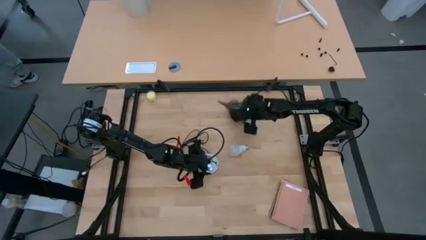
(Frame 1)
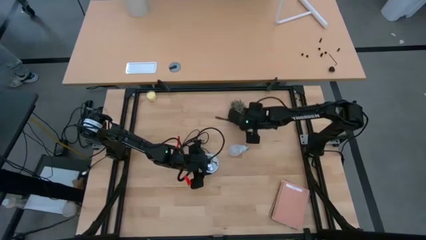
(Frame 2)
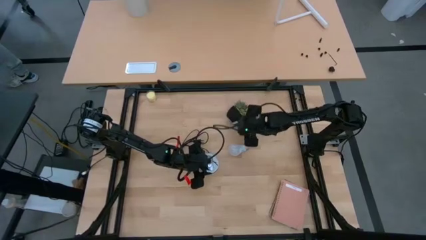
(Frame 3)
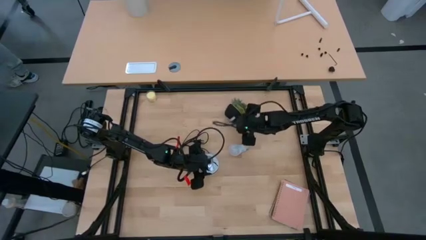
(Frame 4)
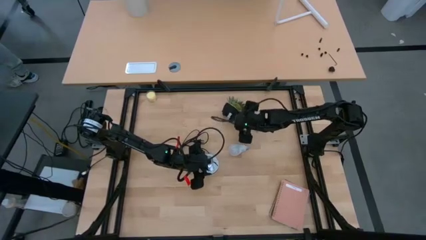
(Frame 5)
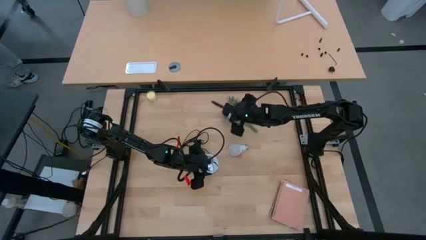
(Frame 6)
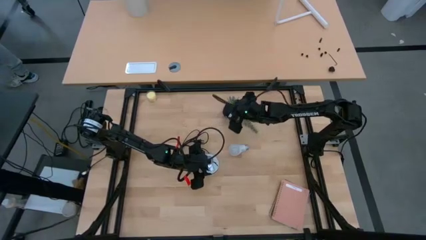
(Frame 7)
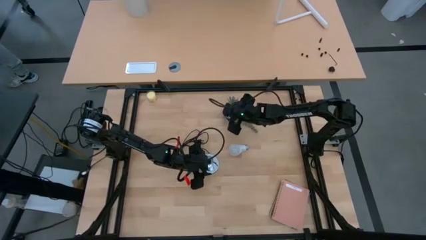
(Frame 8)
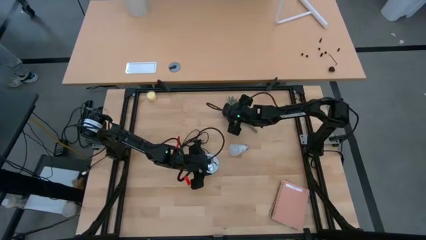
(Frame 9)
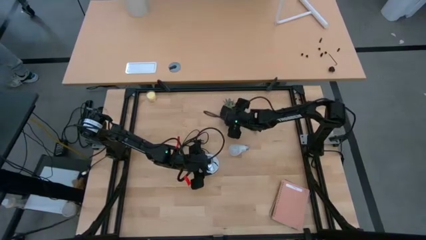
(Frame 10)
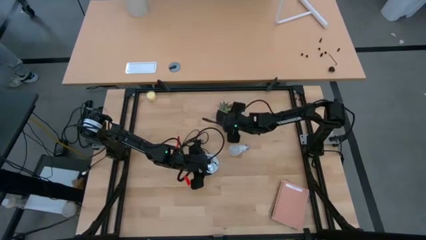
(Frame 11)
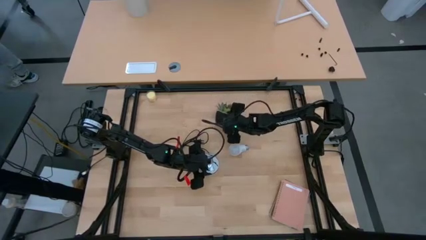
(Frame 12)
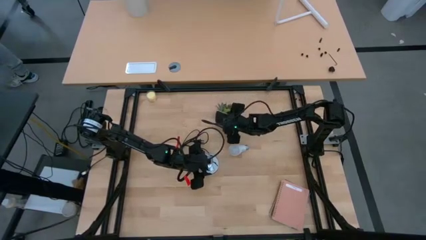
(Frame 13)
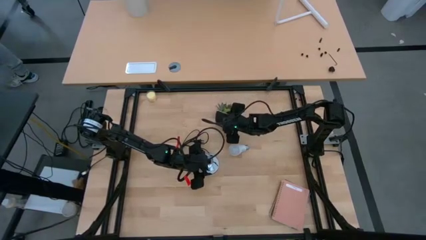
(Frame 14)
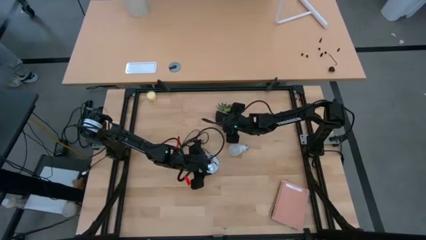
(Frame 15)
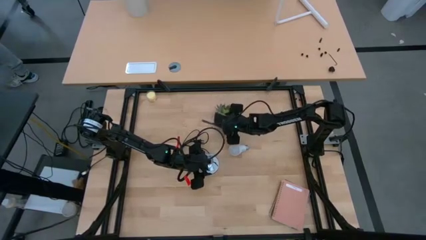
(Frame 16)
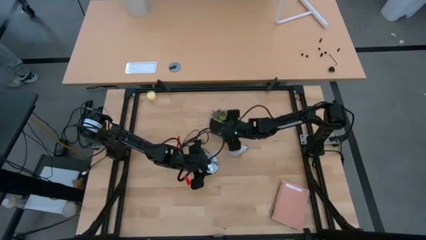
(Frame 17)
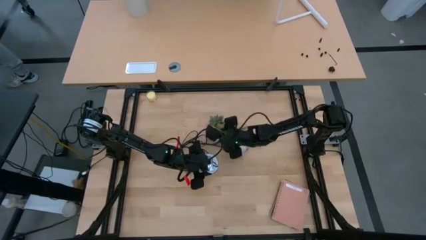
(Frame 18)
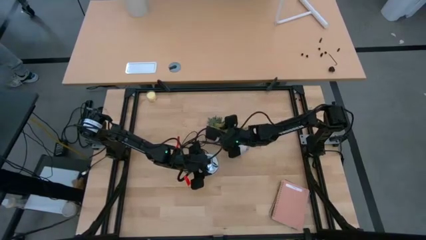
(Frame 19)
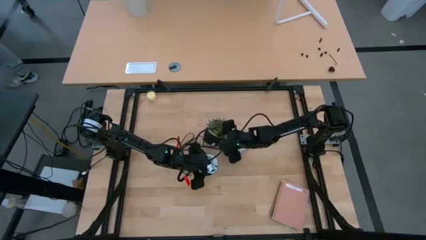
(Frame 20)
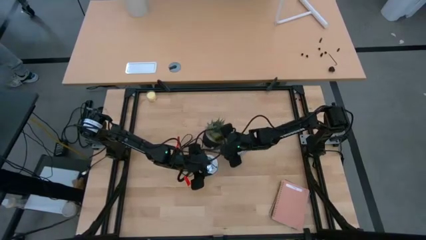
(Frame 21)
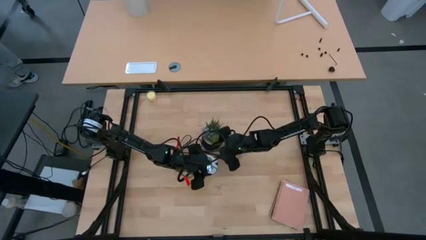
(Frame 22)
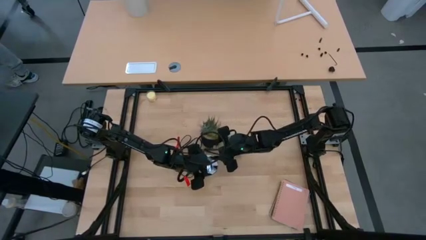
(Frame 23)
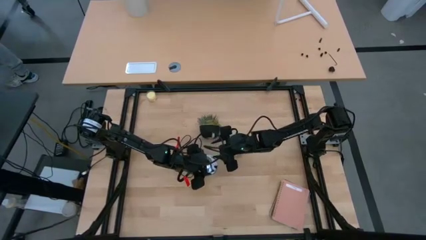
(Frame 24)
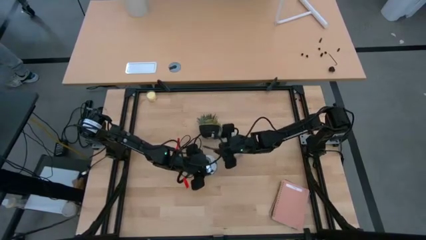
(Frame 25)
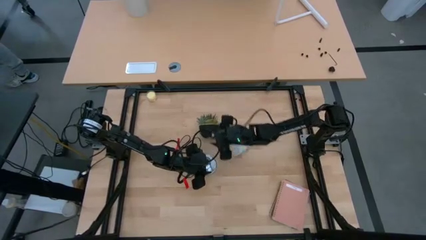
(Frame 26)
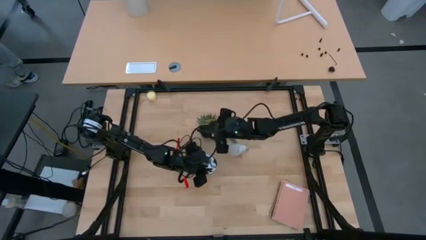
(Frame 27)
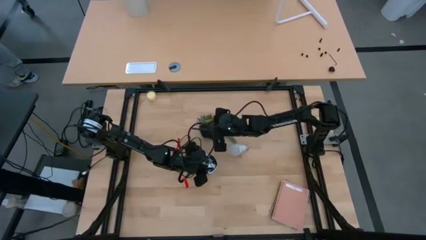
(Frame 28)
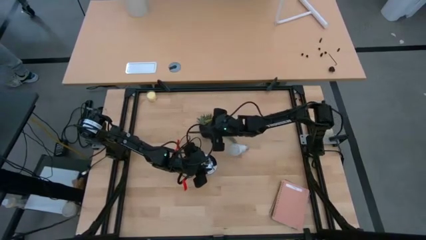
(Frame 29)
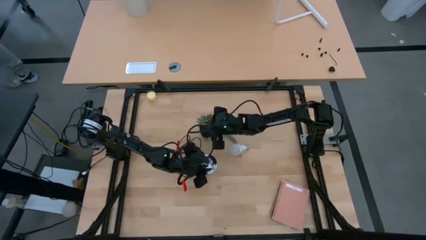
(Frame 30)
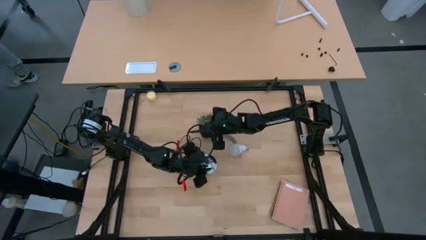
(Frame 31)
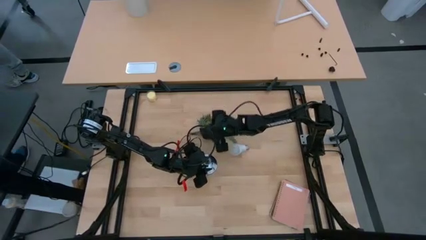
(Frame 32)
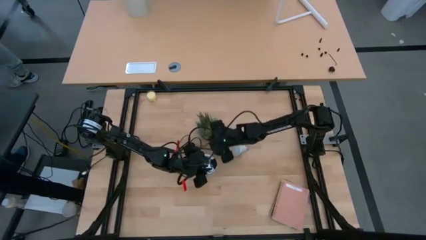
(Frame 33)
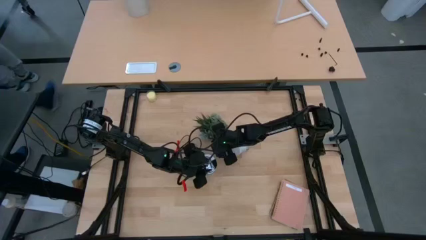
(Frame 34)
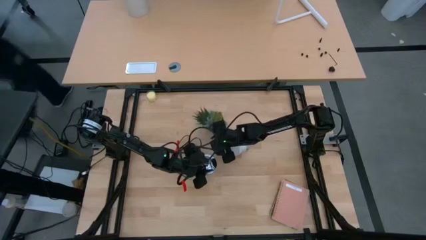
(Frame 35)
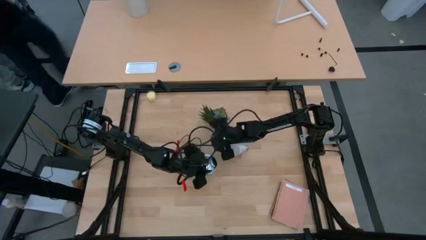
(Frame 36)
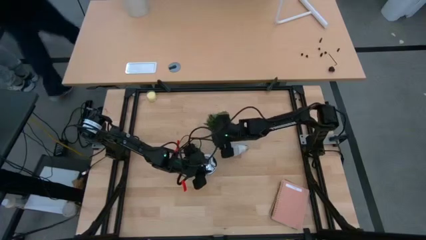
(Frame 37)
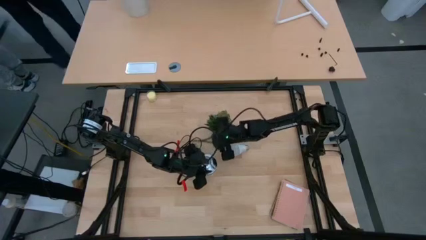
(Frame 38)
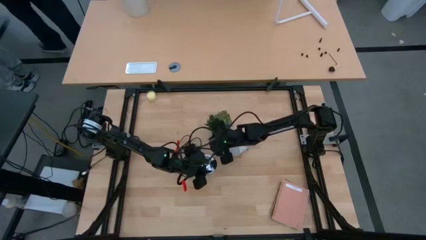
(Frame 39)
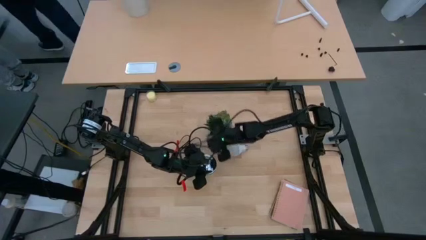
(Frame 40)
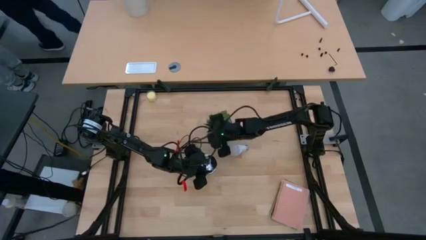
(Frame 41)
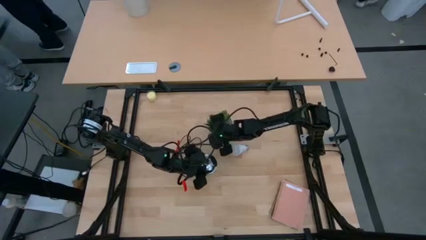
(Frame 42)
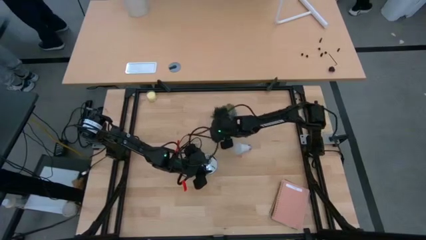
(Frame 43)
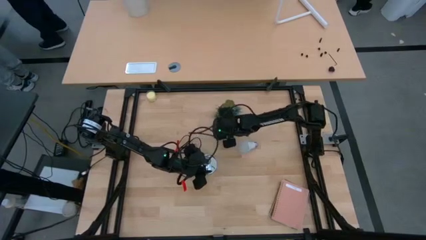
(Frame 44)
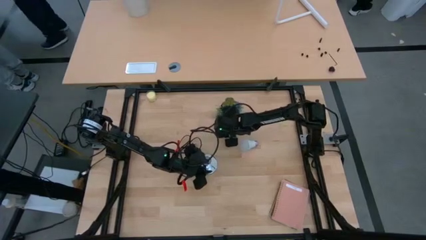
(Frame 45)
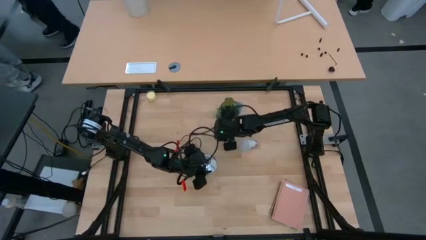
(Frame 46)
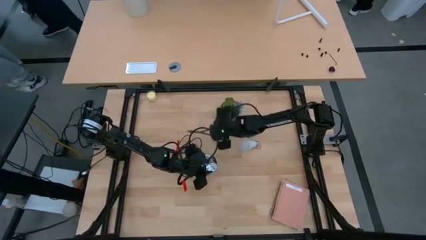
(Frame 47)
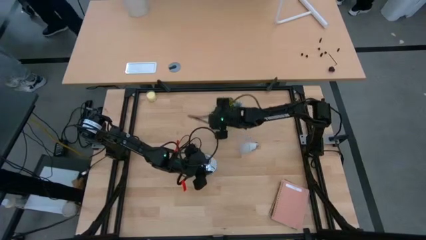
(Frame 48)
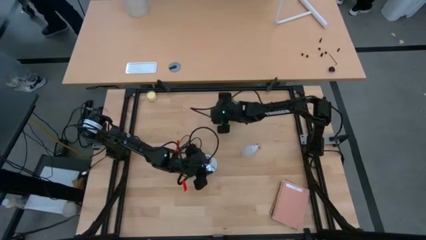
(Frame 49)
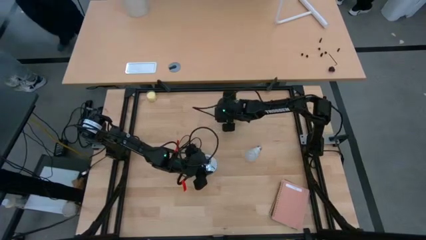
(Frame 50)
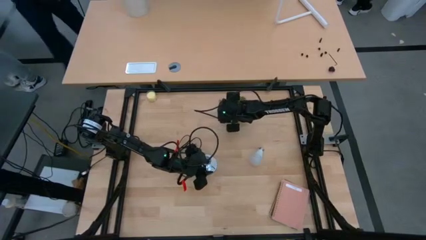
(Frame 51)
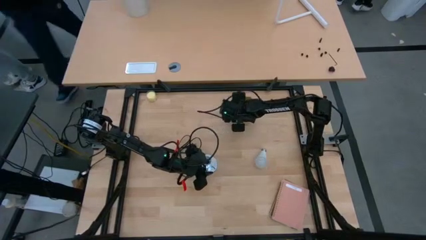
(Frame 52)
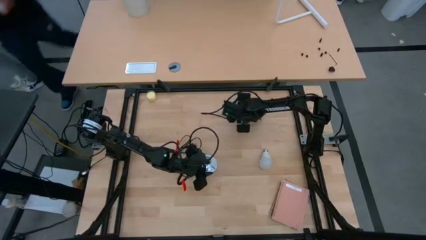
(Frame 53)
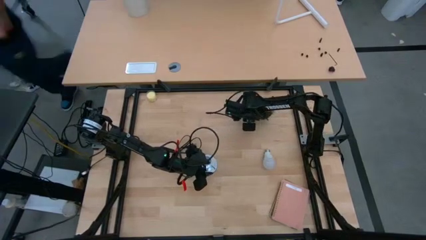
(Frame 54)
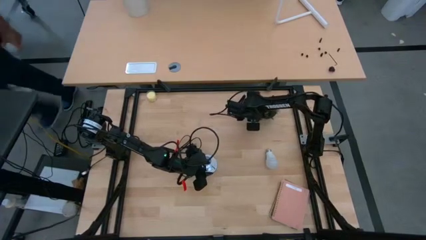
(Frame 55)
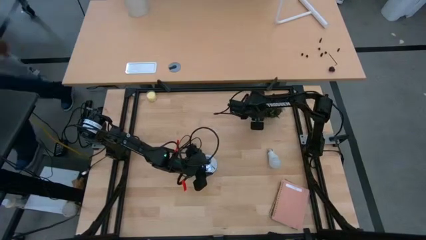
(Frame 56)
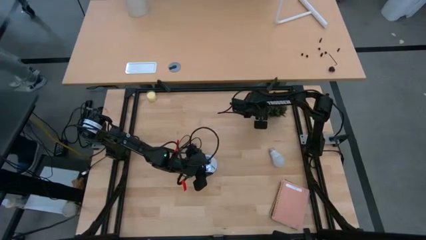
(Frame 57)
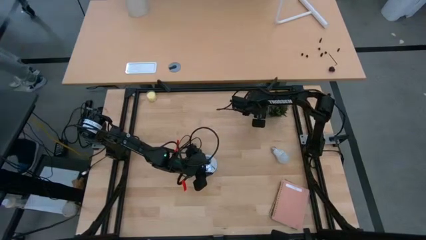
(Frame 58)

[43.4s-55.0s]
Task: Screw lightbulb
Adjust the potted flower
